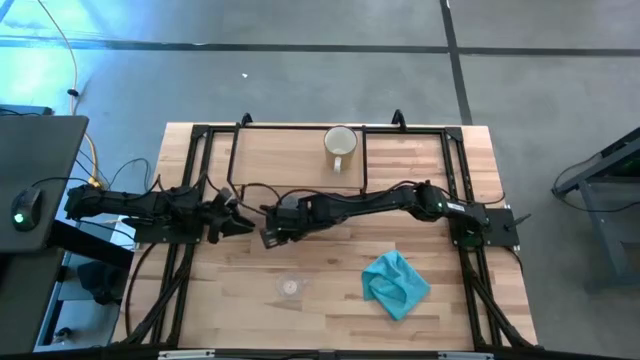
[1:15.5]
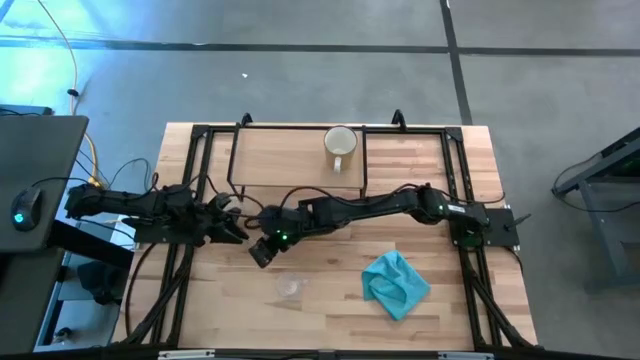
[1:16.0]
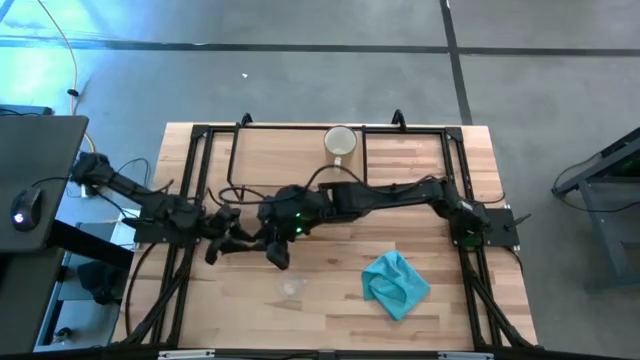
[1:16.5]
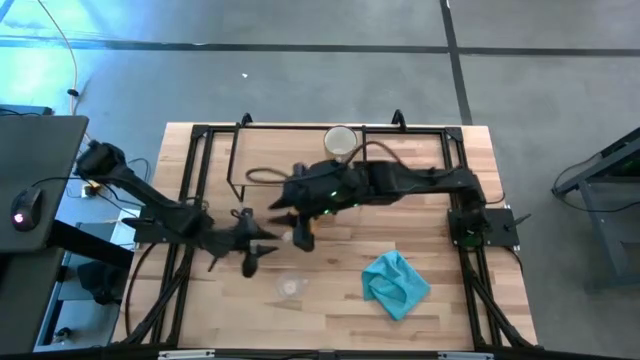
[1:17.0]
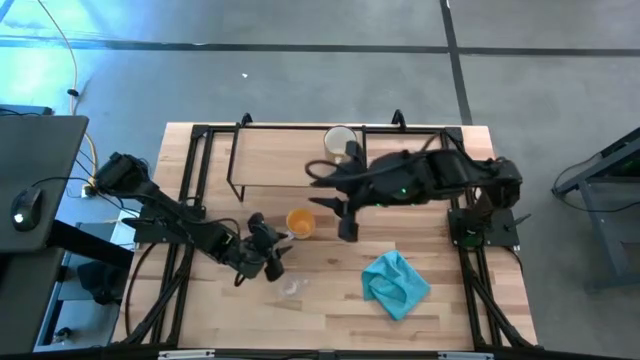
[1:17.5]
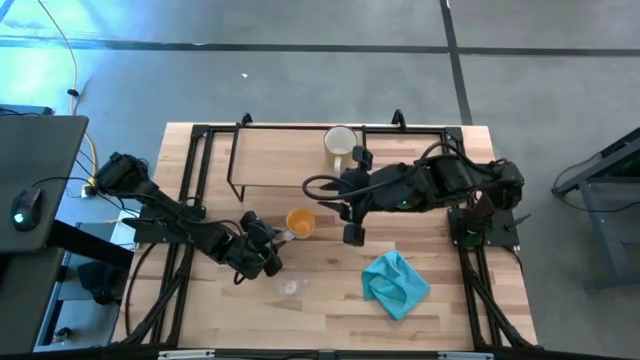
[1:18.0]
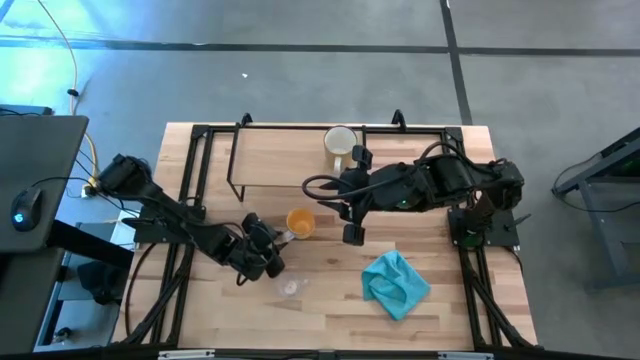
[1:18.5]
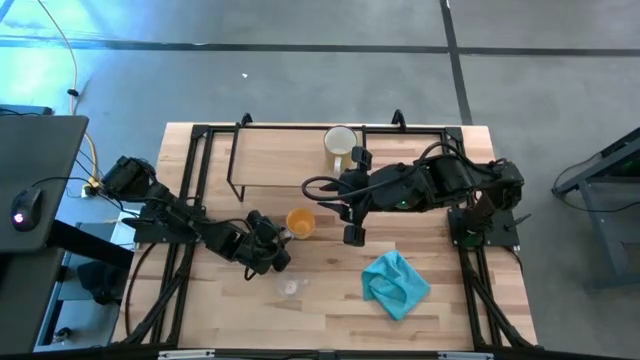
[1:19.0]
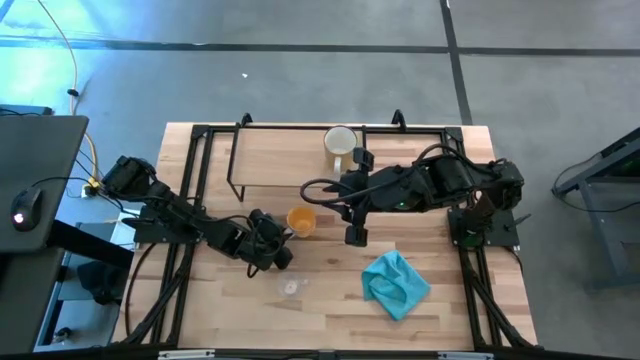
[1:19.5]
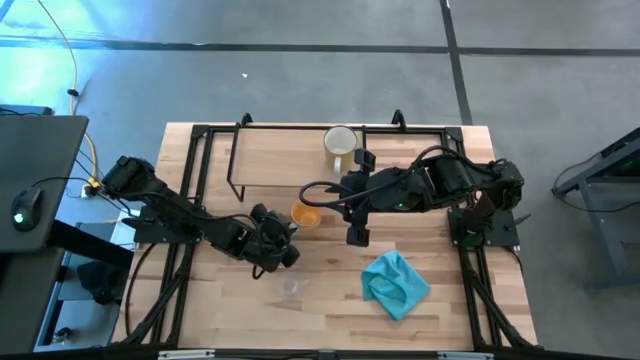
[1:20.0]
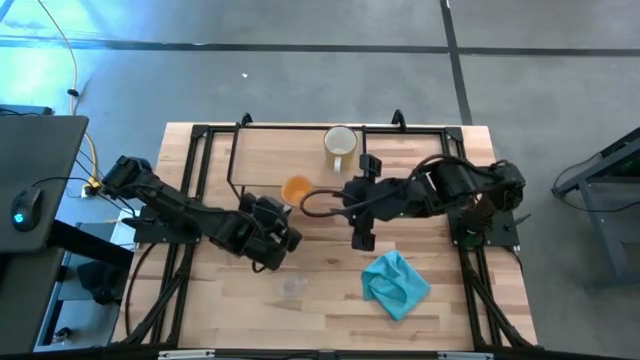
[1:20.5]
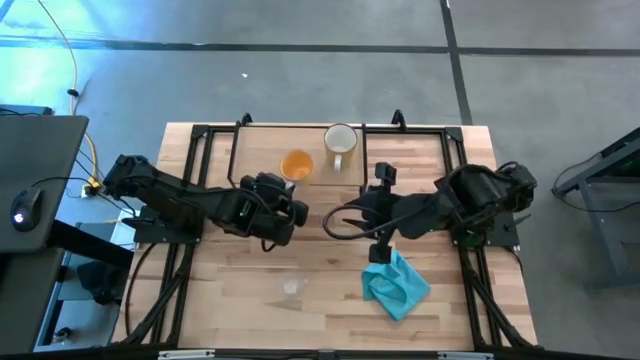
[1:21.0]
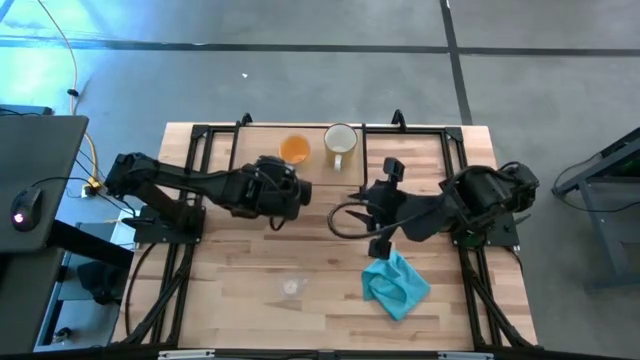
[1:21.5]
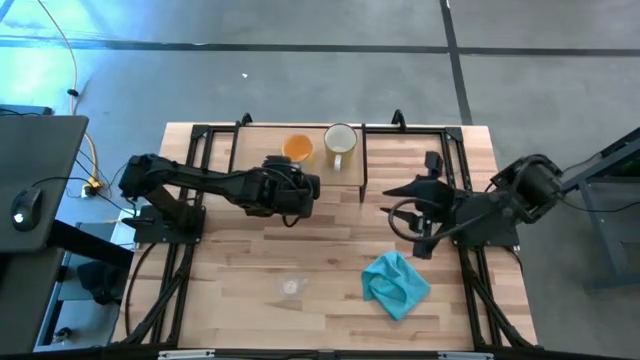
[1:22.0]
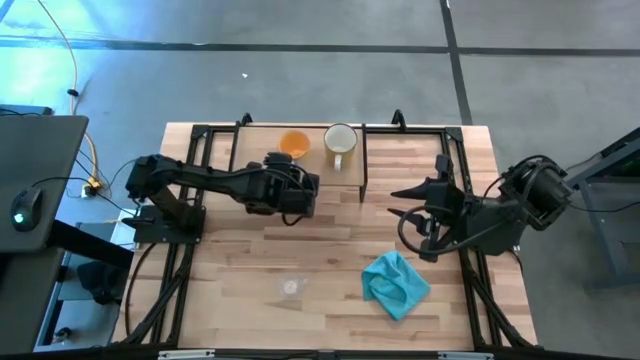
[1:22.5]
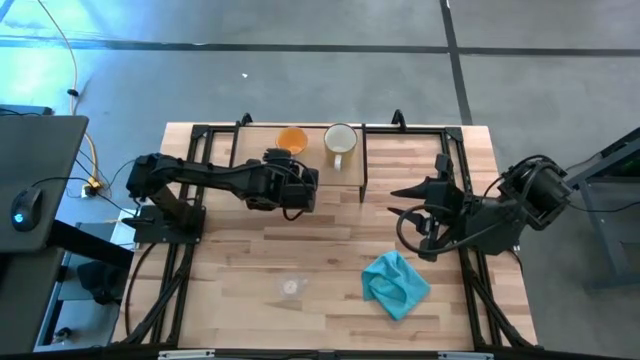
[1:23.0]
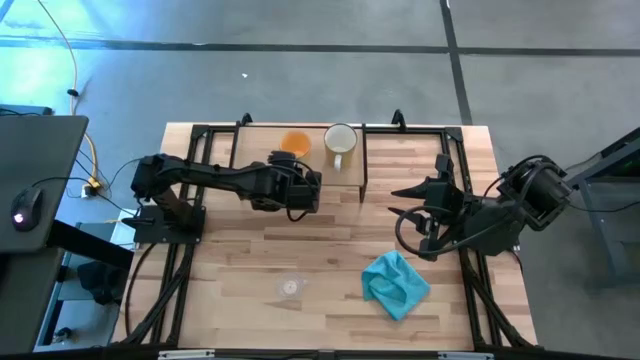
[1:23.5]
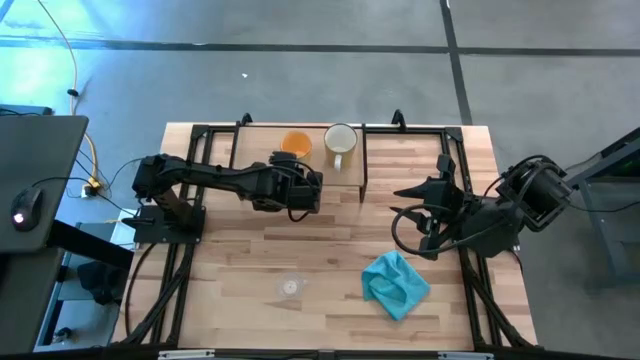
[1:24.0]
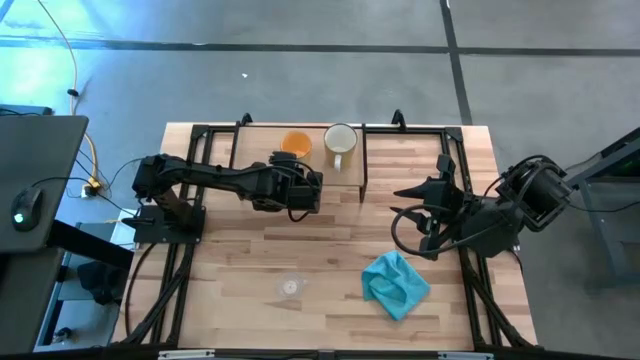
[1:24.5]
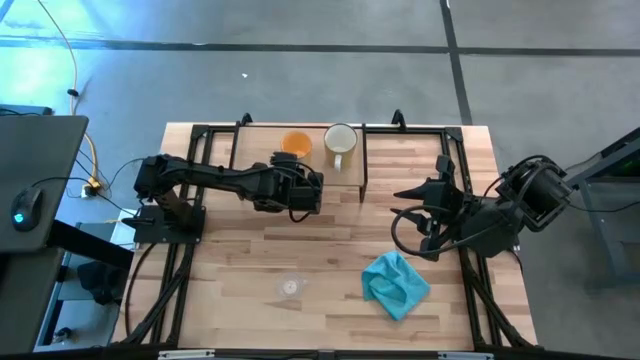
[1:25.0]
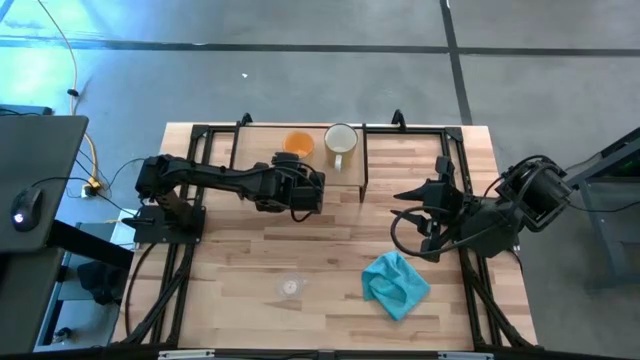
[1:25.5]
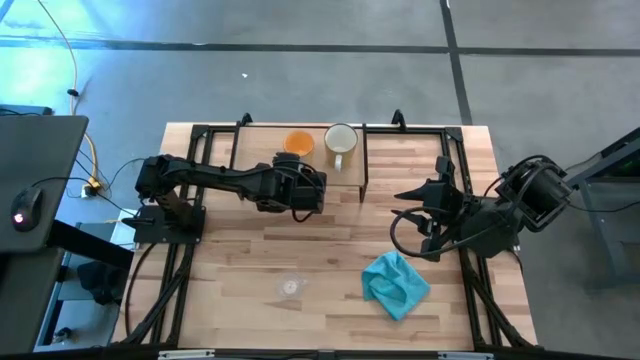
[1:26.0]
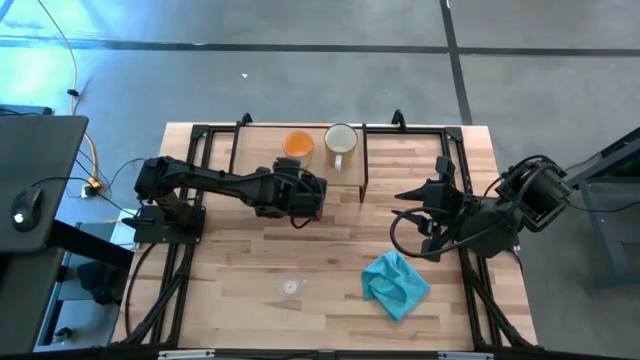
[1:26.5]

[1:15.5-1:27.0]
Task: Stack small to large cups/mugs on shelf
Put the yellow mug on the shelf

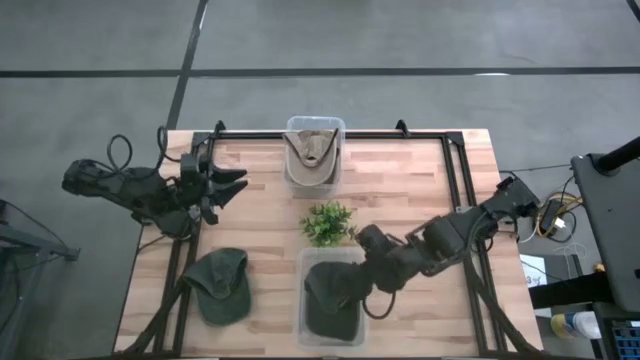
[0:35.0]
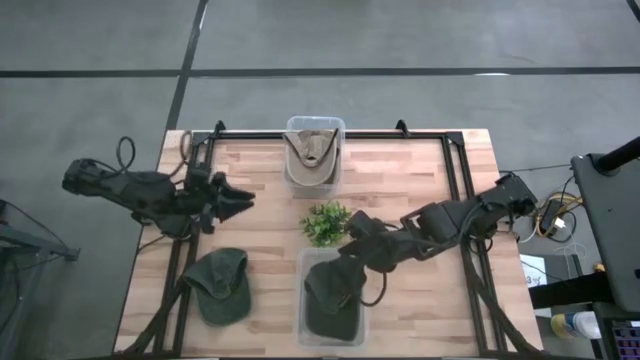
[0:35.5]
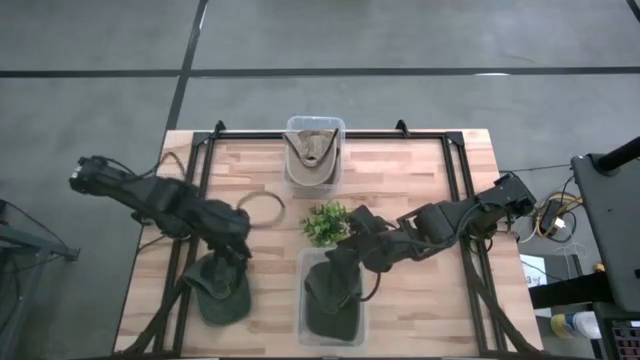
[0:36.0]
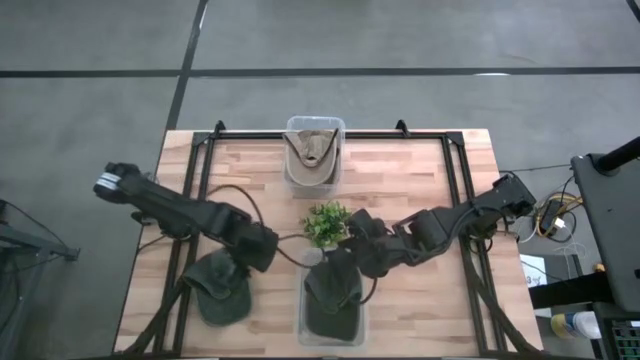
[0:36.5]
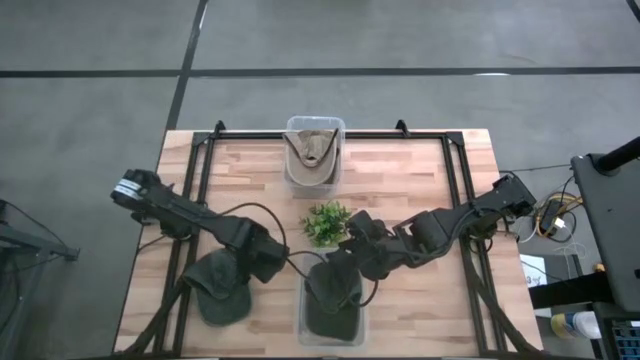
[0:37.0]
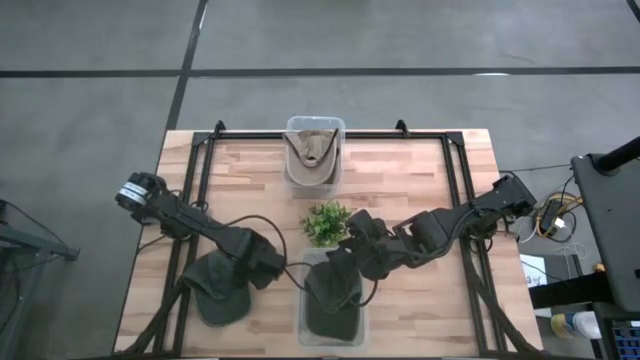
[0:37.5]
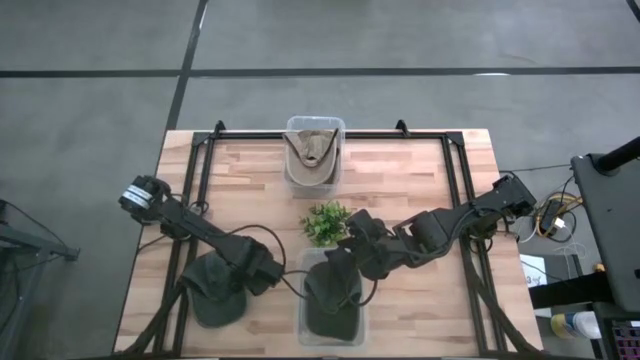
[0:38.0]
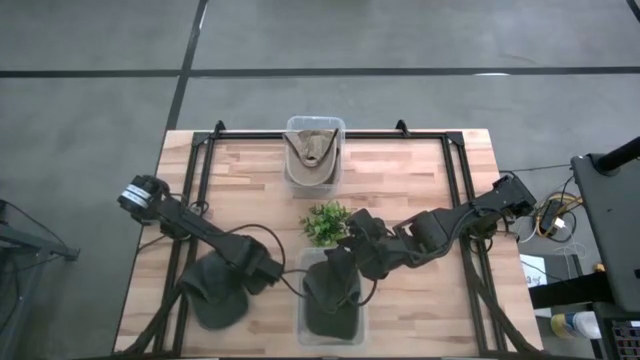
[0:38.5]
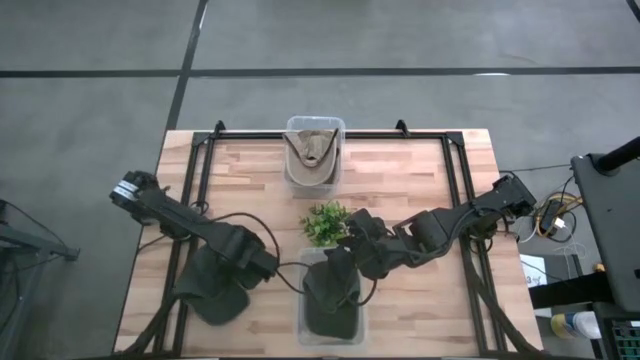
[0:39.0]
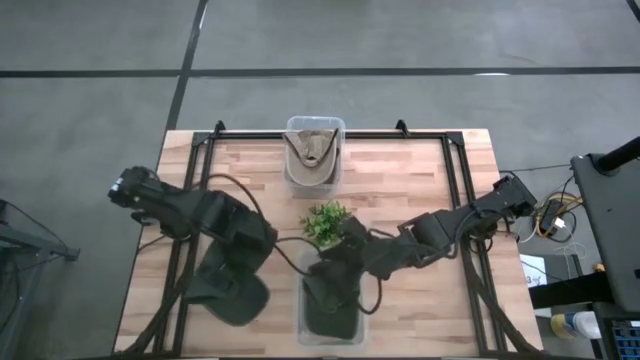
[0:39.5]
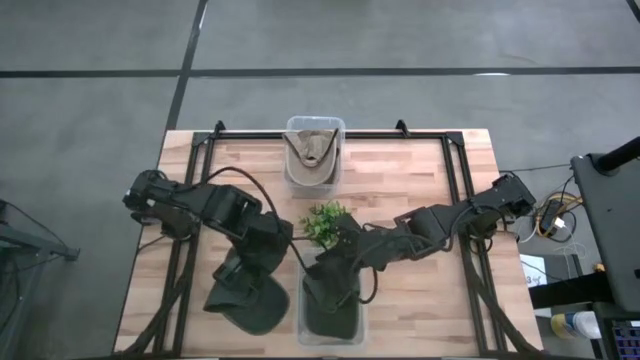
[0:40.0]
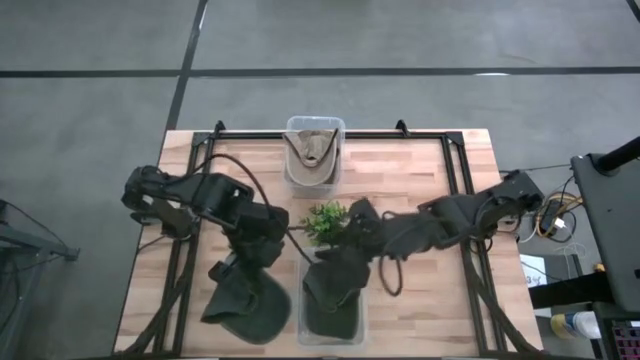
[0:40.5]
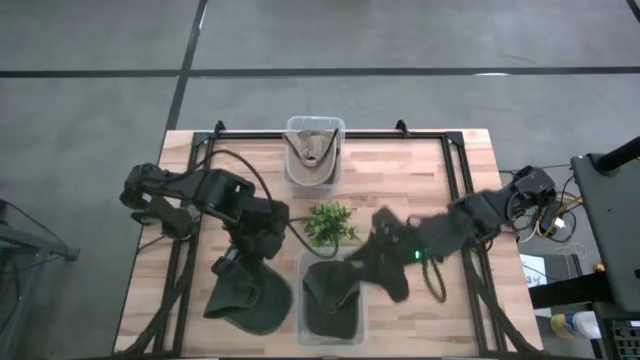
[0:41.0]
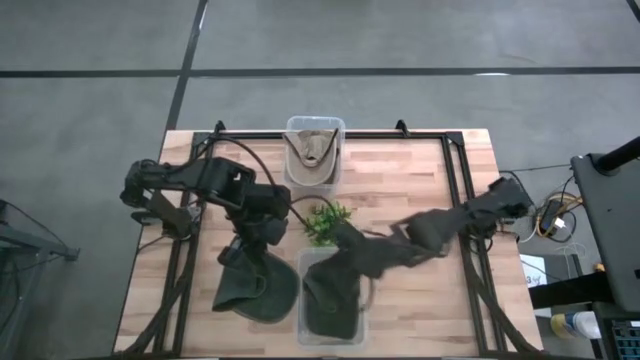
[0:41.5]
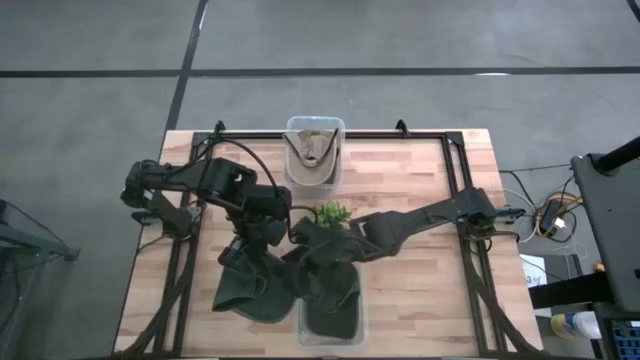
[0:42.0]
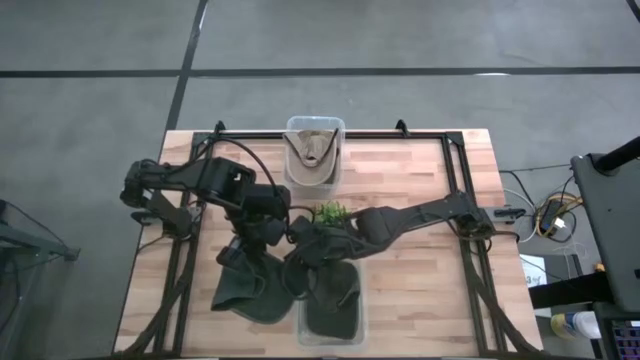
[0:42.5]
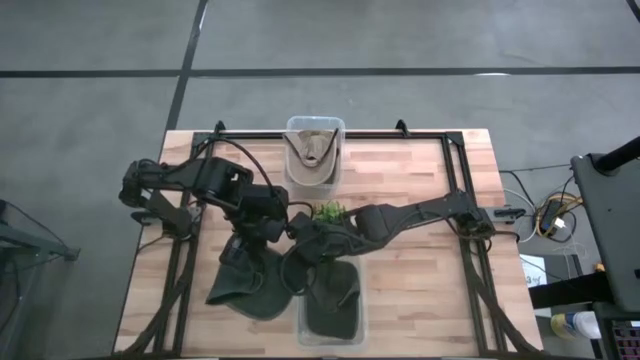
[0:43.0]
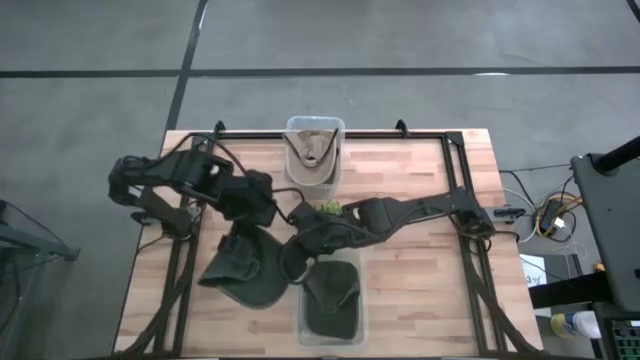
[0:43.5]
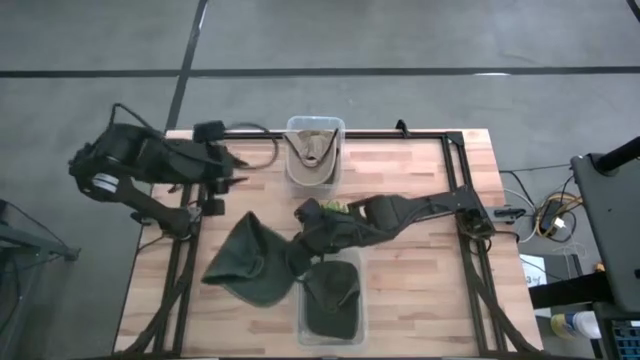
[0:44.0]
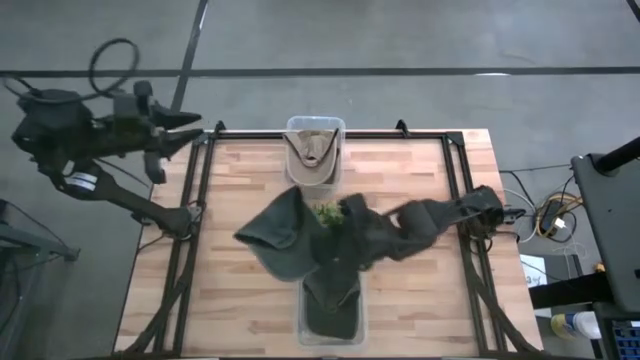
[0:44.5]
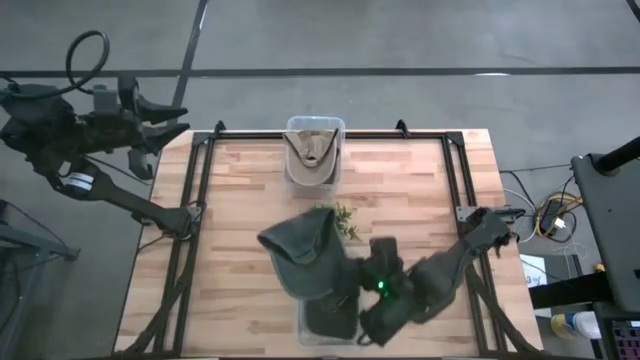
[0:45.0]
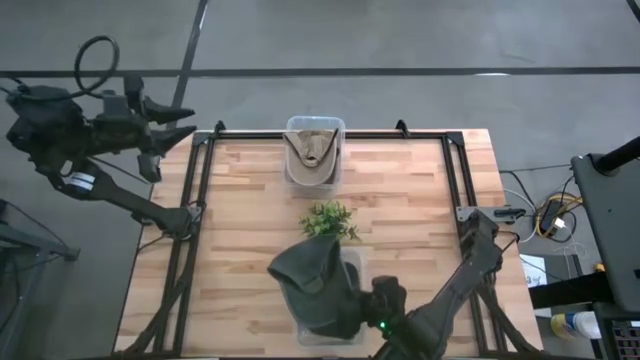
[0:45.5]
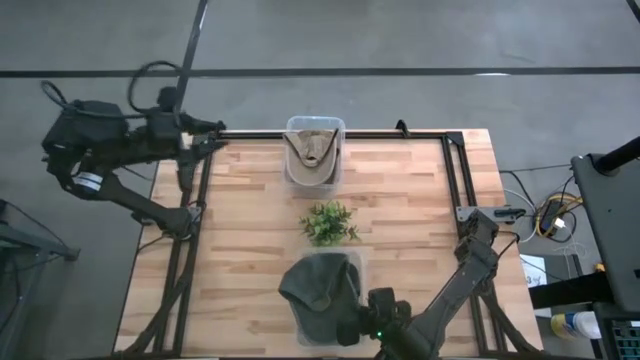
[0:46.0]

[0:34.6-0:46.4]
Task: Pick & Place hat
Put the black cap into the bottom transparent bin
